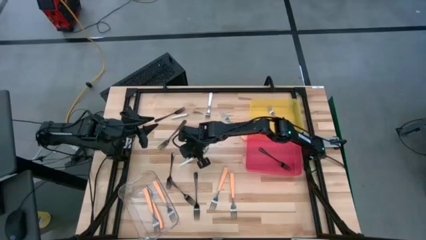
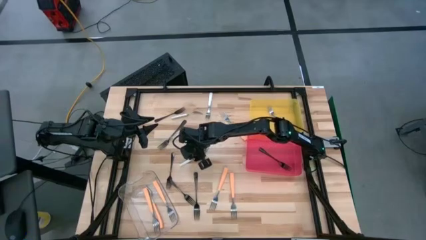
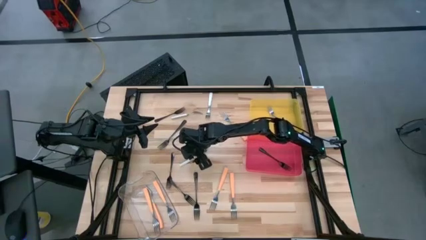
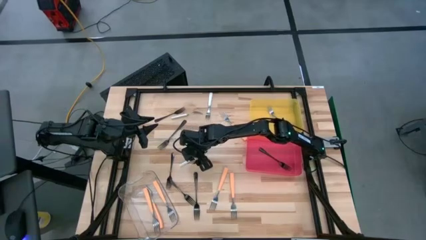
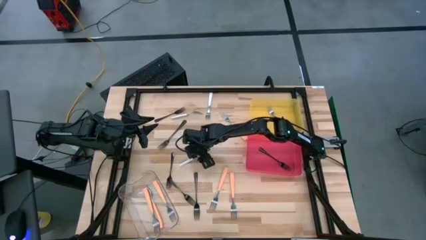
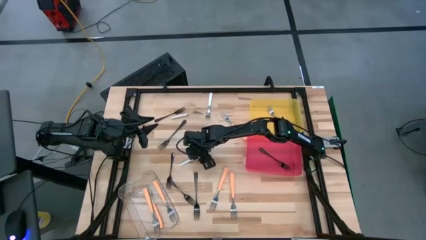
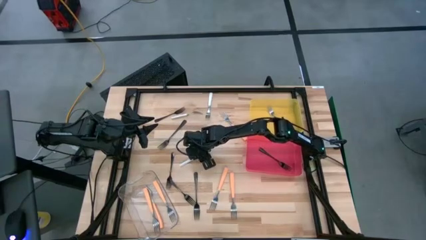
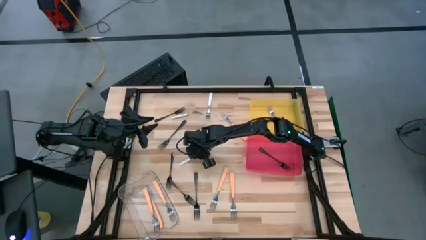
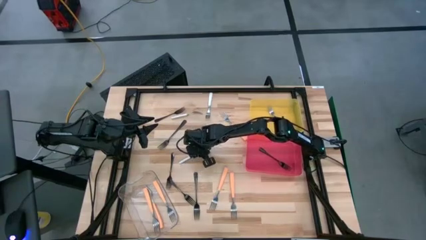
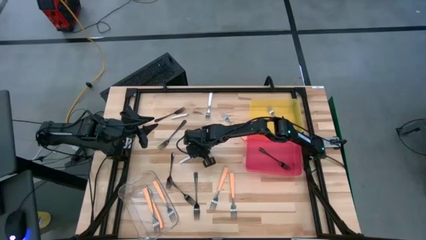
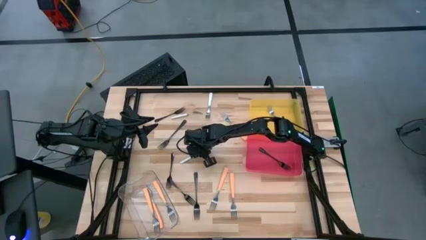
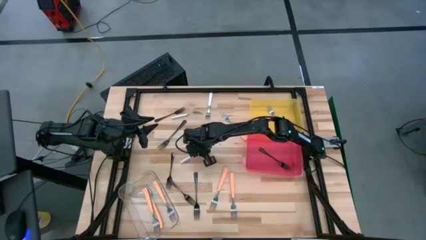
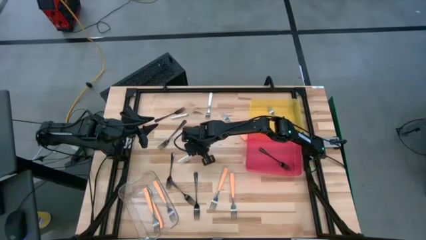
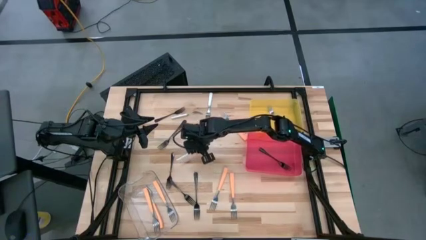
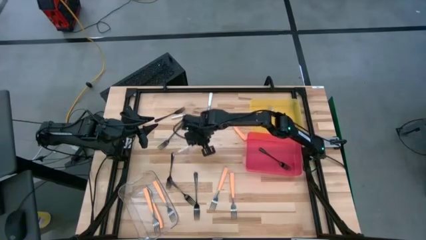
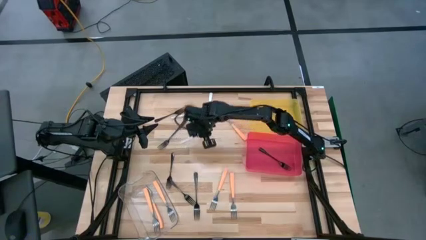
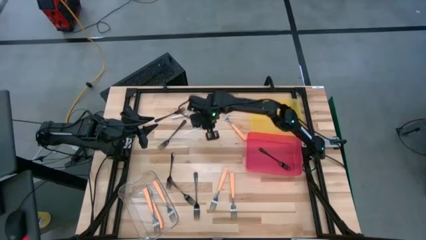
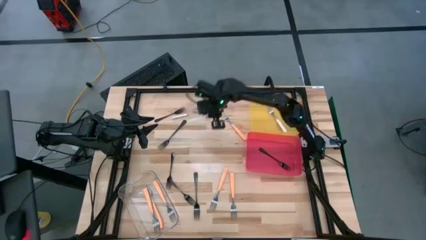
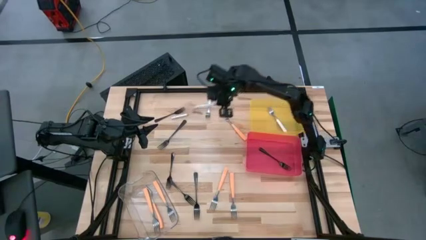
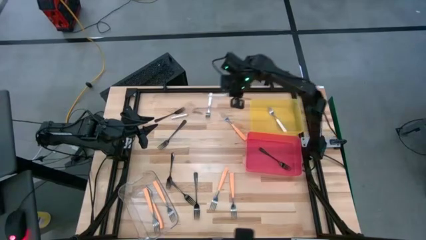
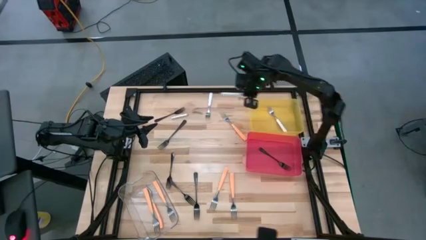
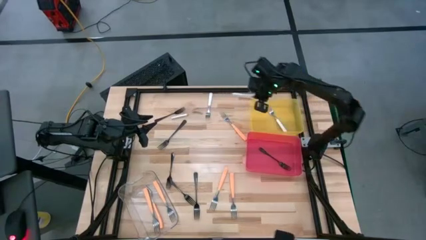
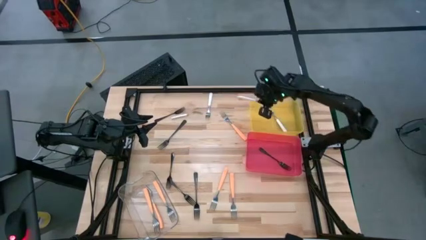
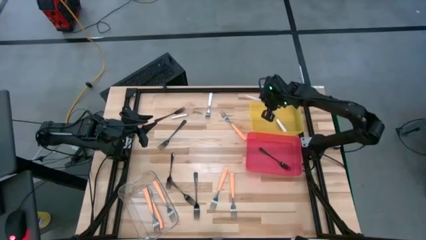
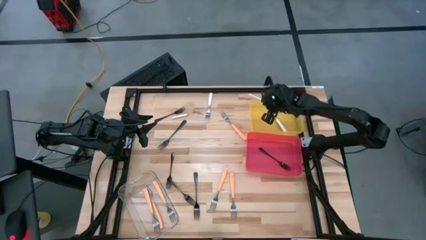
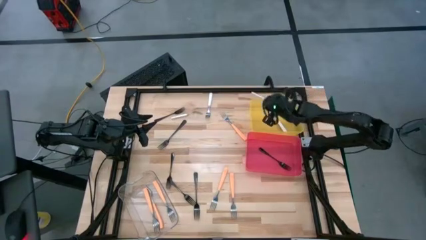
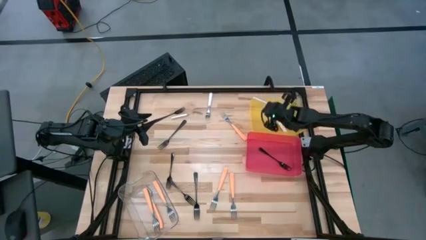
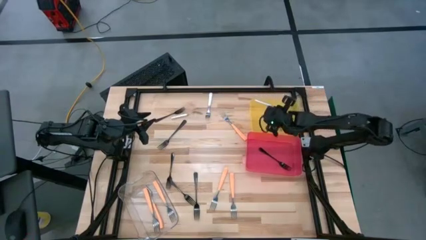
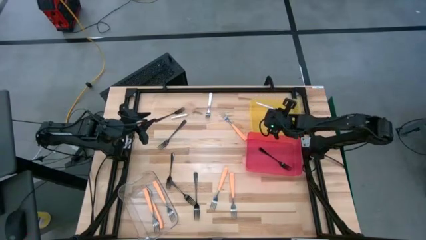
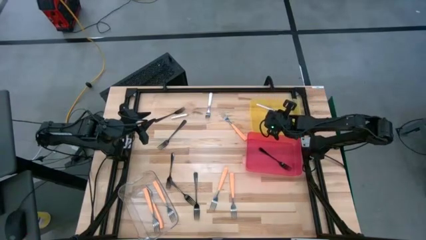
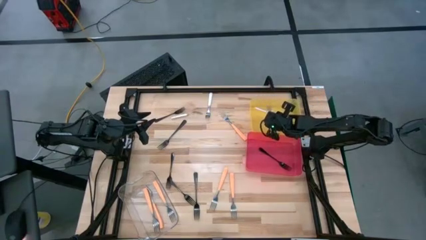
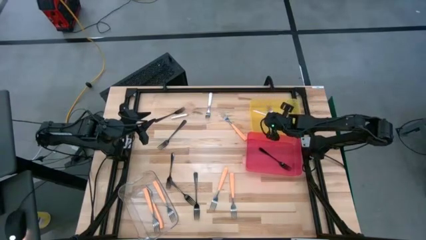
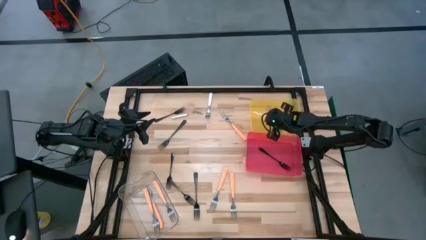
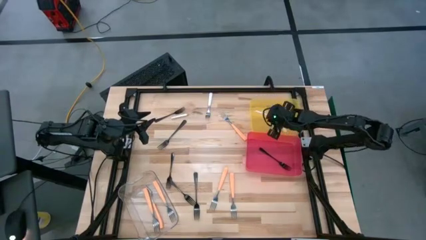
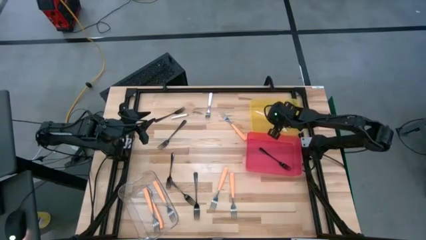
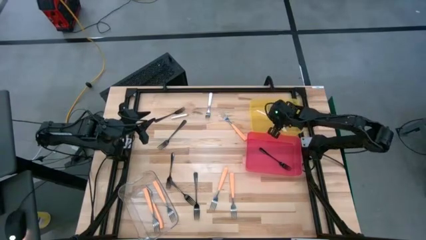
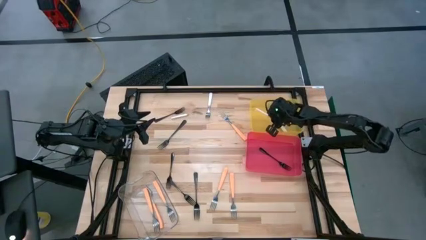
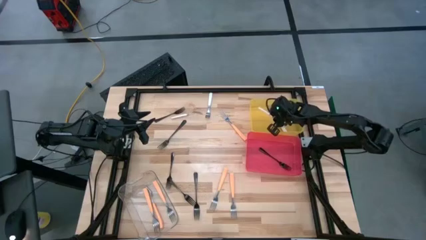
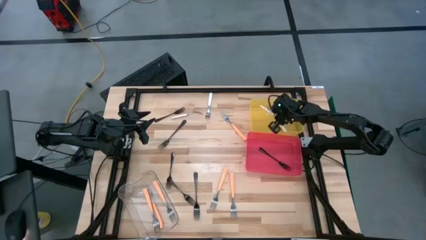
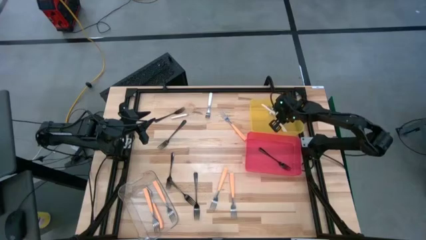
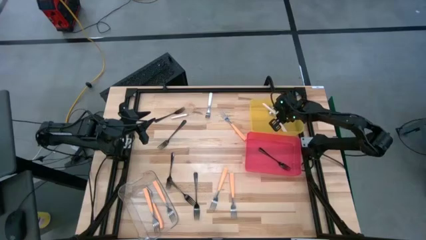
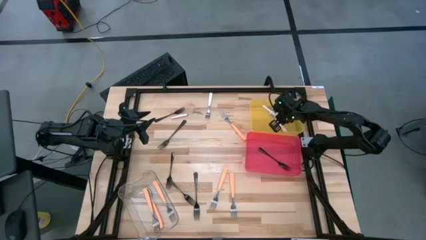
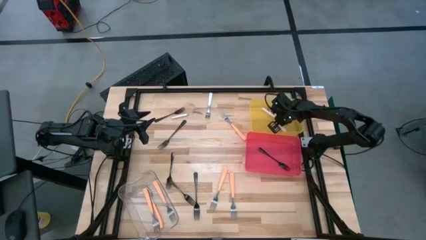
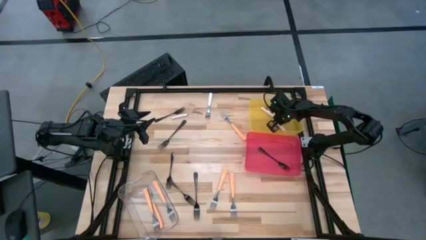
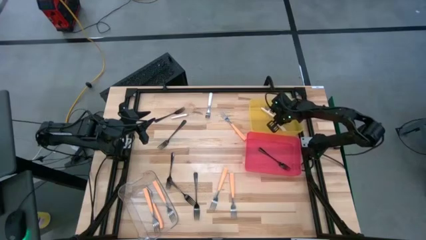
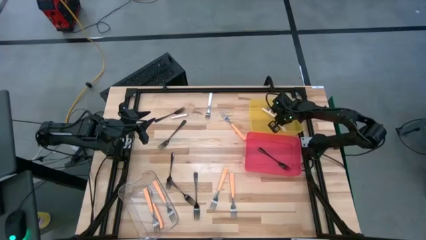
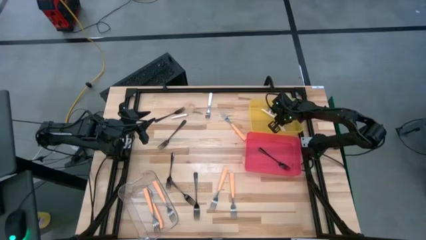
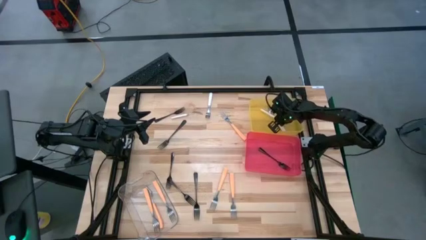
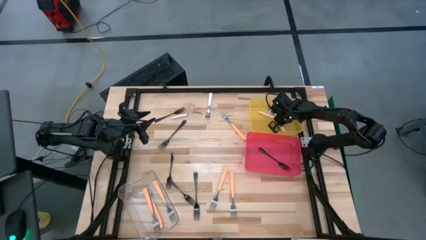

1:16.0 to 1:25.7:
Task: Sort silverware by color (type)
Put the white fork into the yellow bin

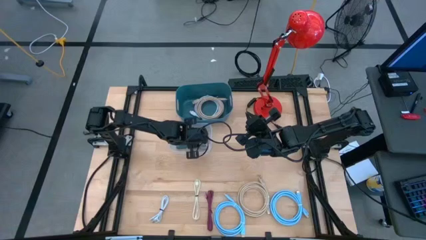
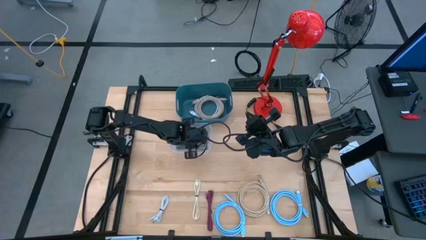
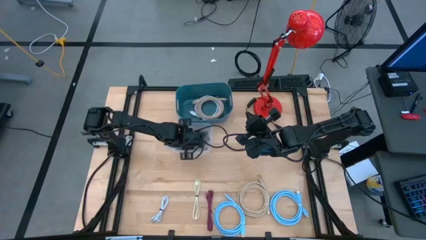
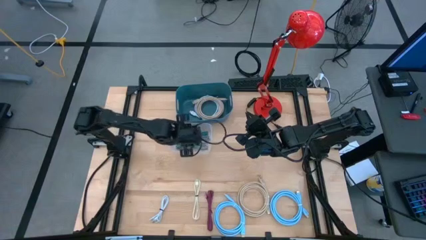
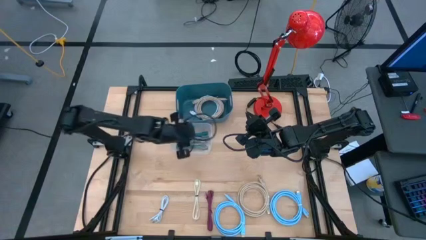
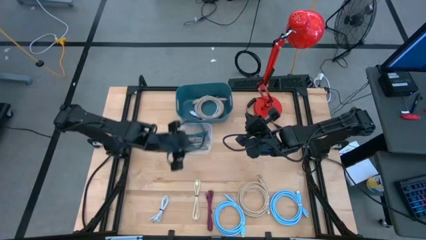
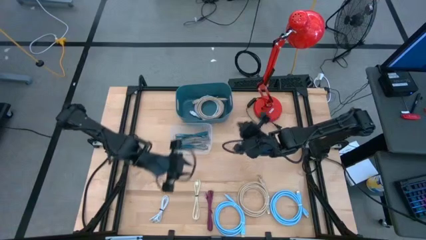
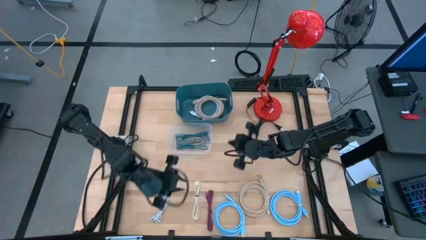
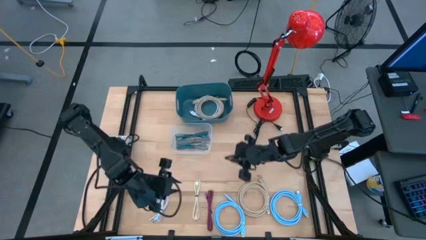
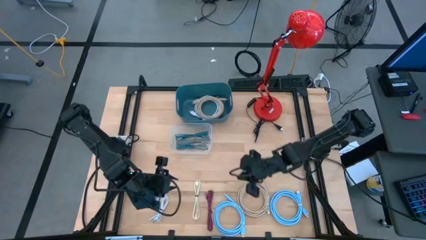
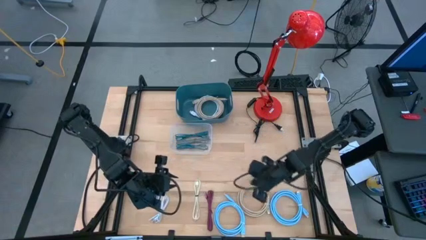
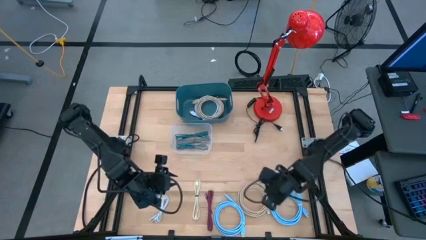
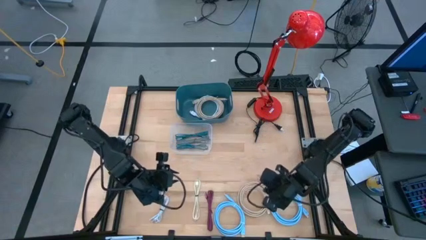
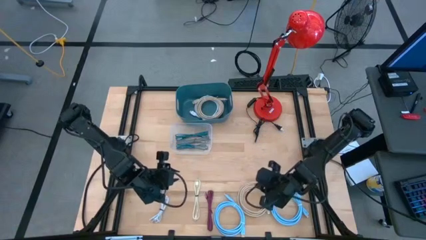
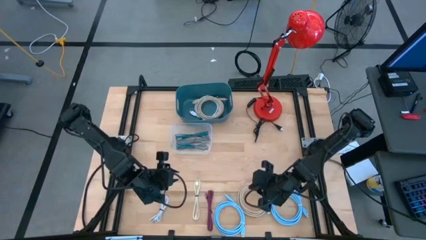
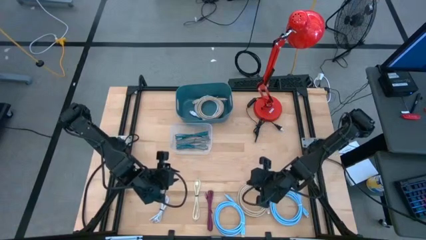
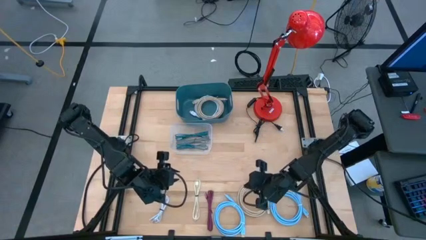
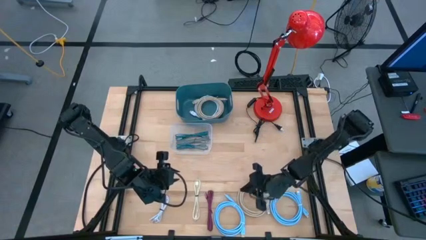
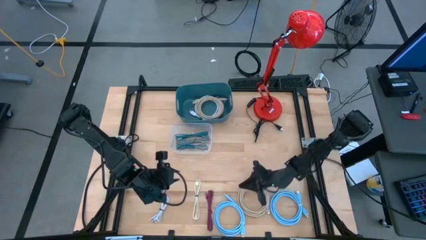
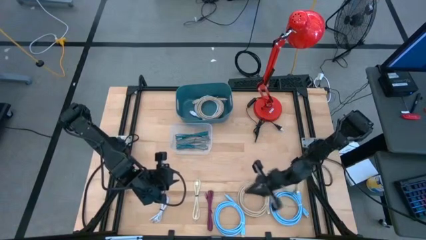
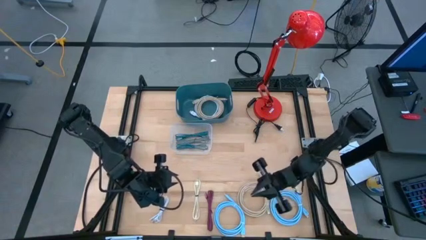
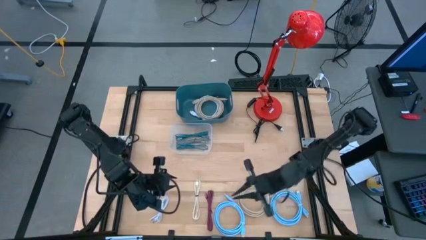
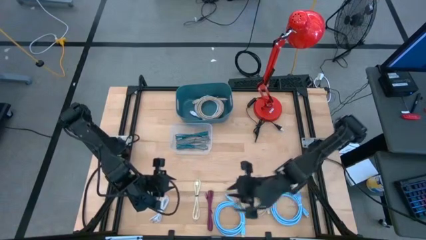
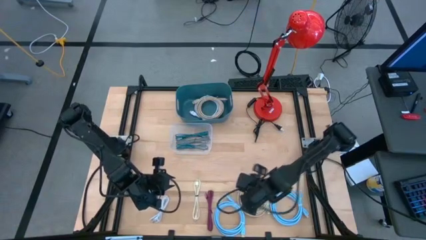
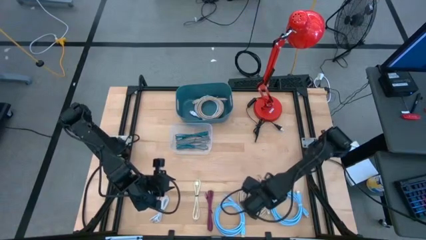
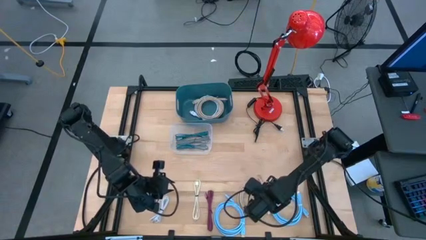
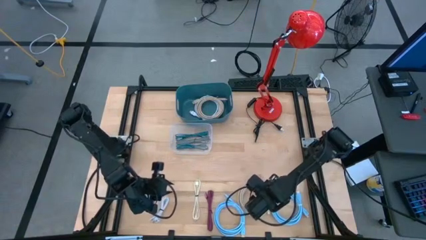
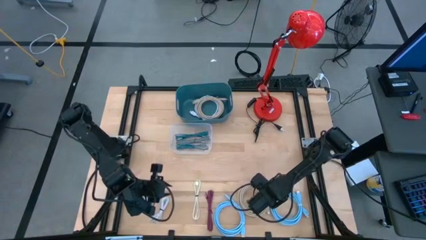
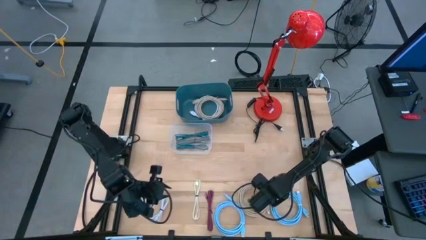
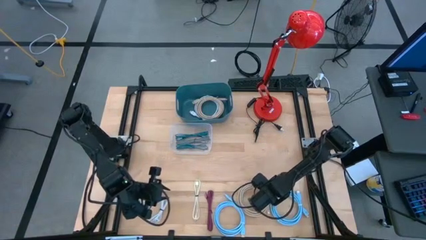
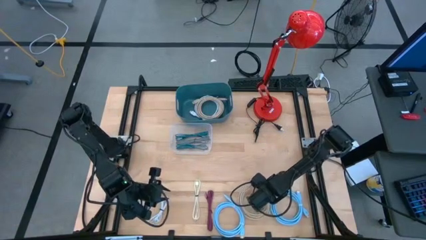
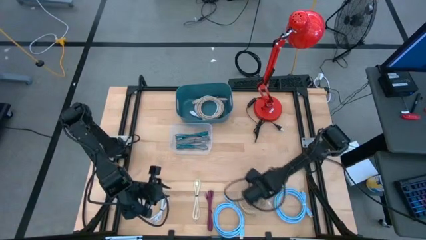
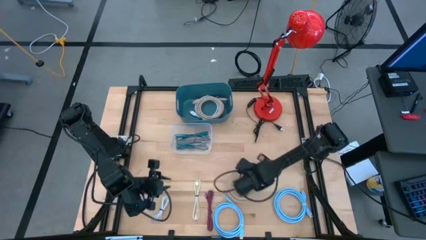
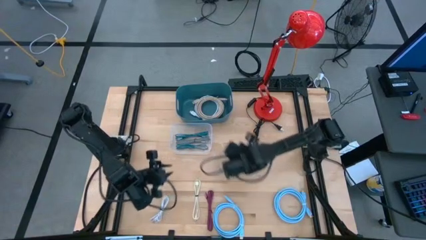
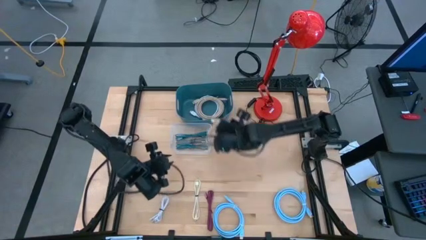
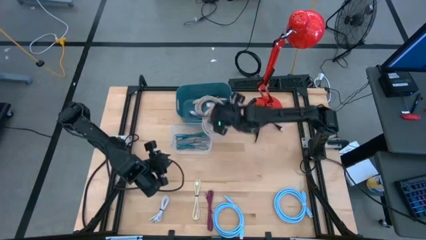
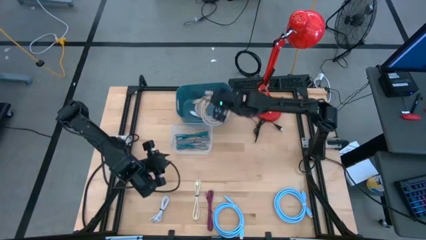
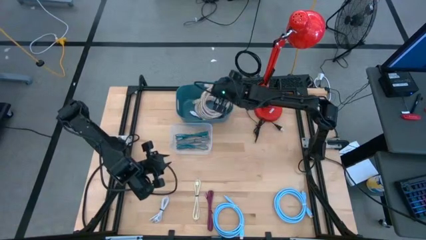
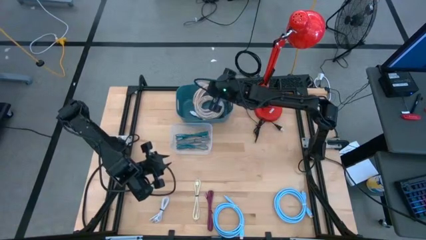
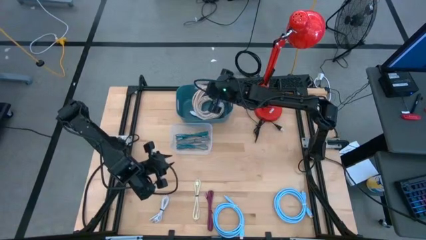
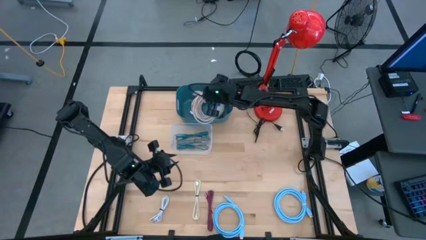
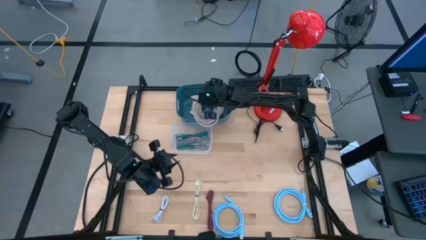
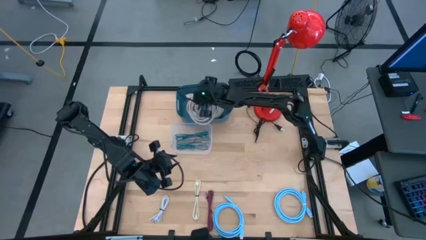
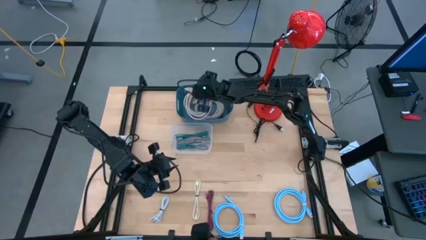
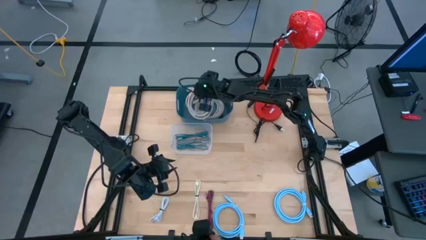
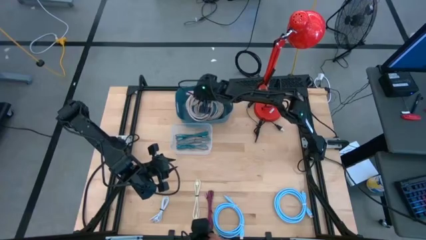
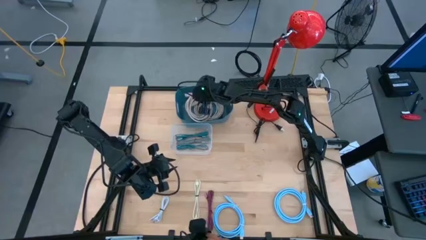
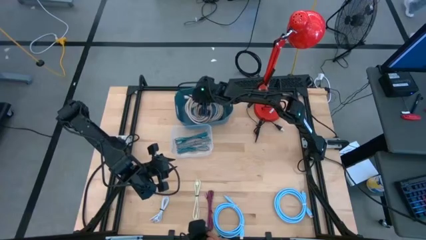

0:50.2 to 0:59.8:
Task: Pick & Place USB Port
Put the light brown USB cable into the dark blue bin
